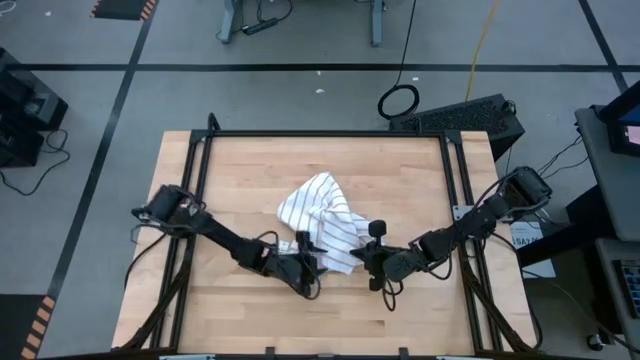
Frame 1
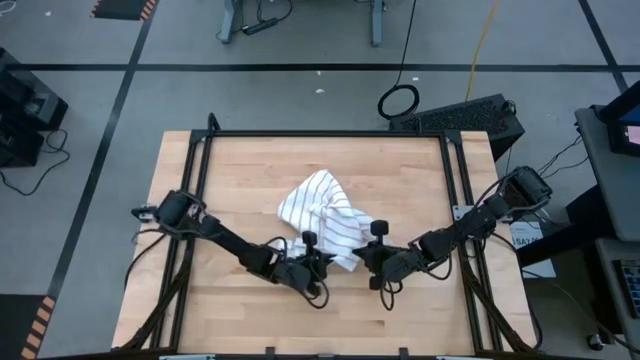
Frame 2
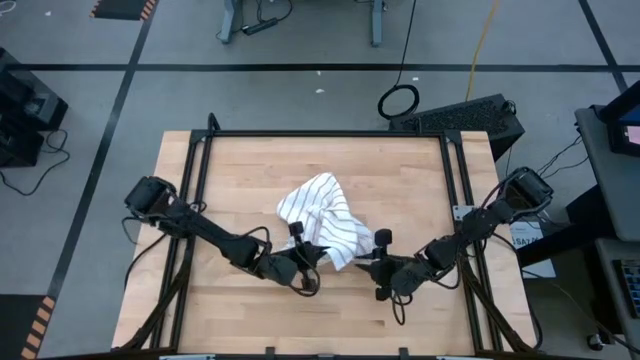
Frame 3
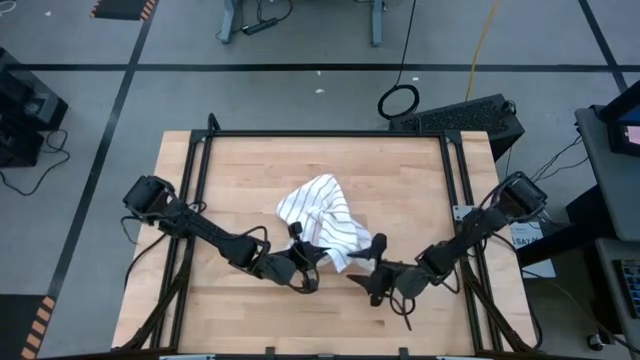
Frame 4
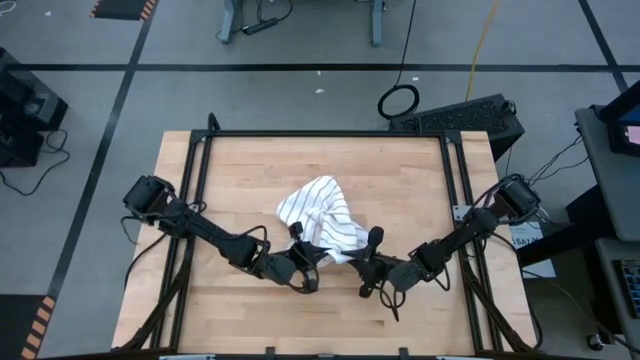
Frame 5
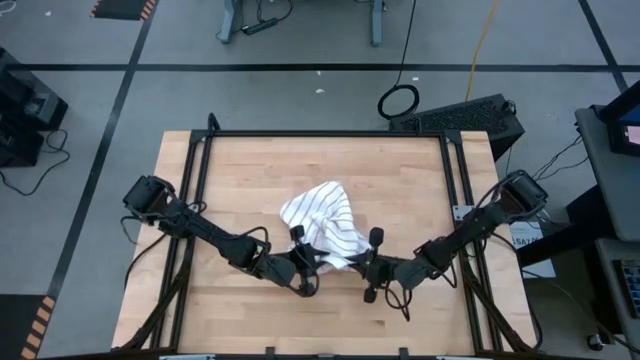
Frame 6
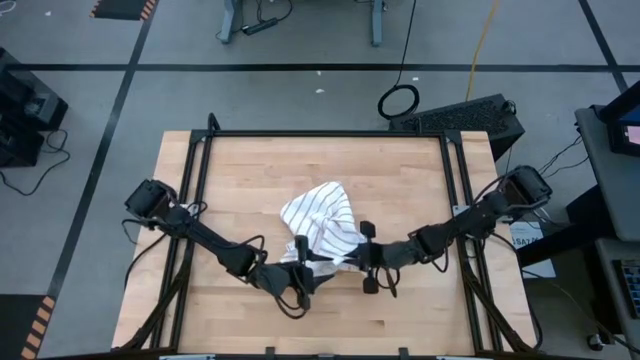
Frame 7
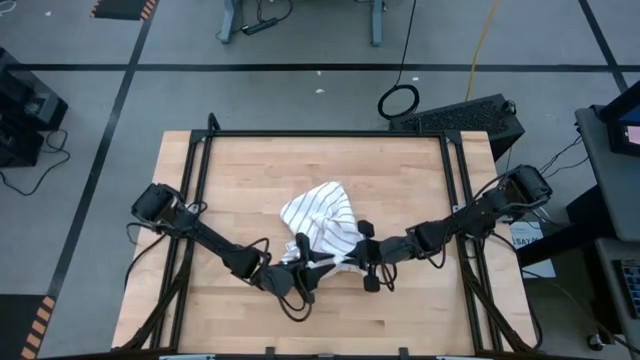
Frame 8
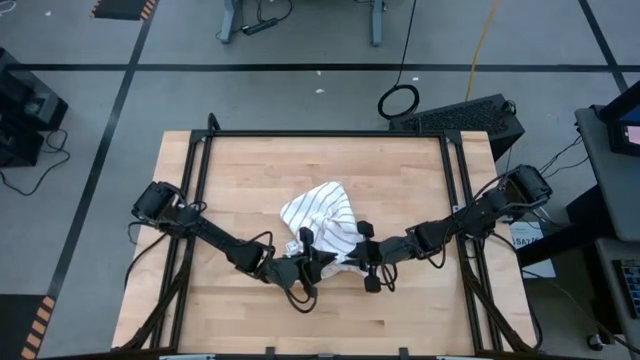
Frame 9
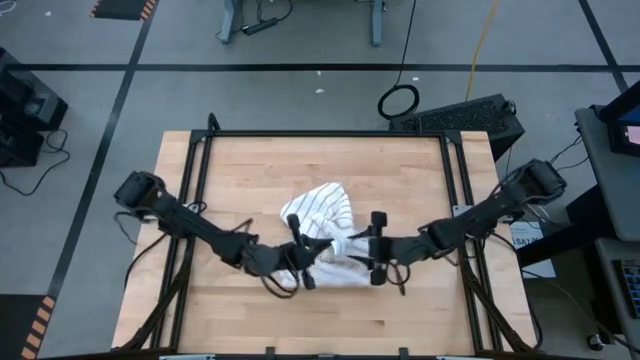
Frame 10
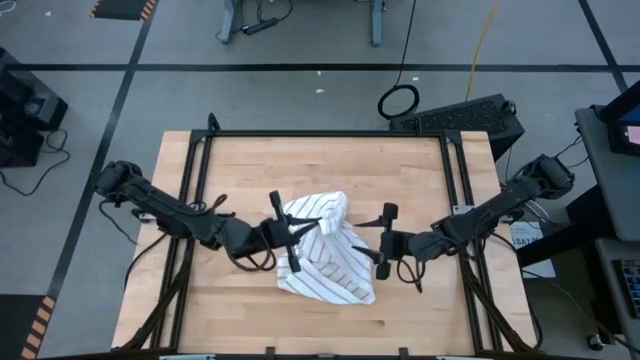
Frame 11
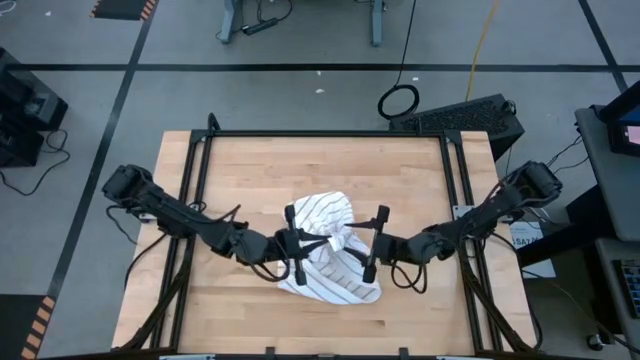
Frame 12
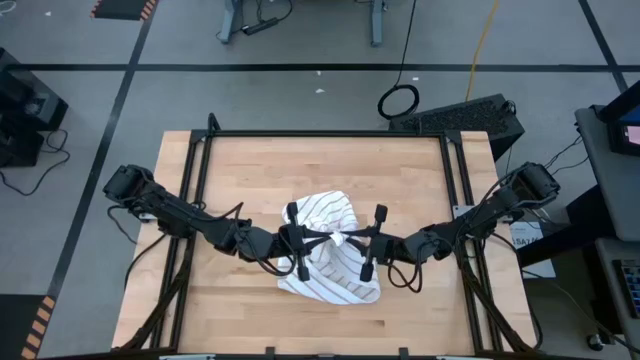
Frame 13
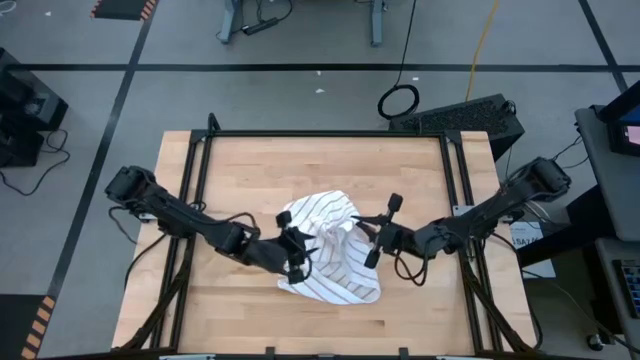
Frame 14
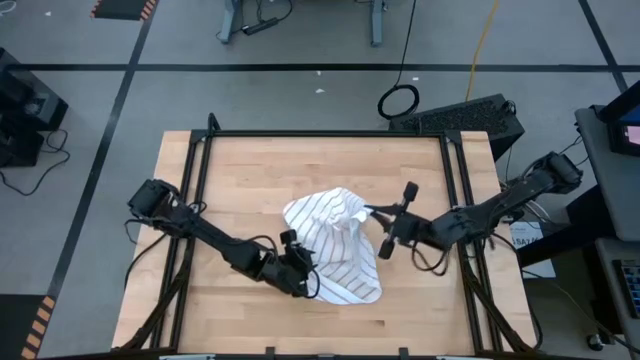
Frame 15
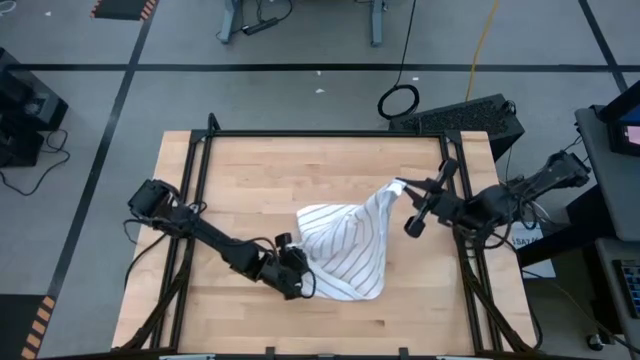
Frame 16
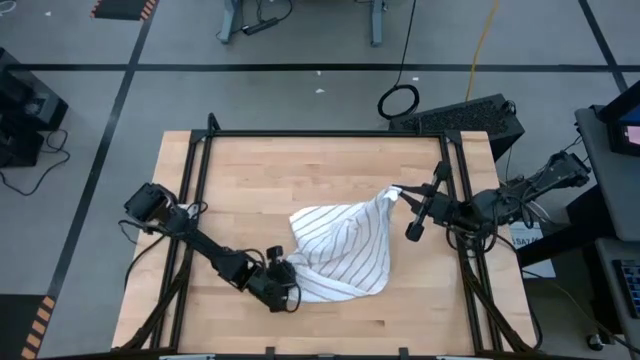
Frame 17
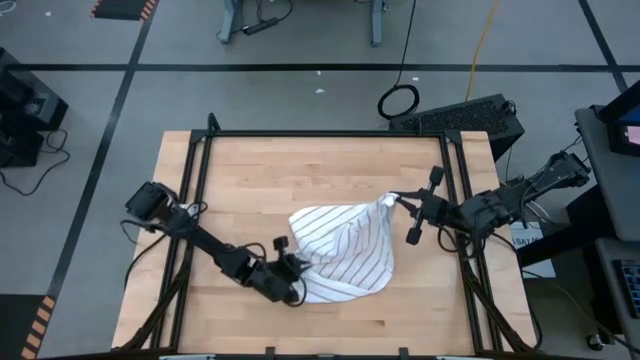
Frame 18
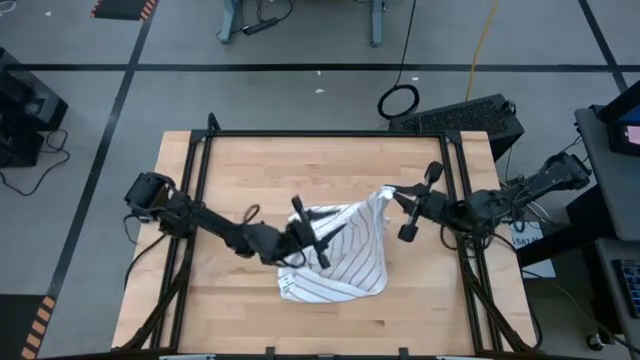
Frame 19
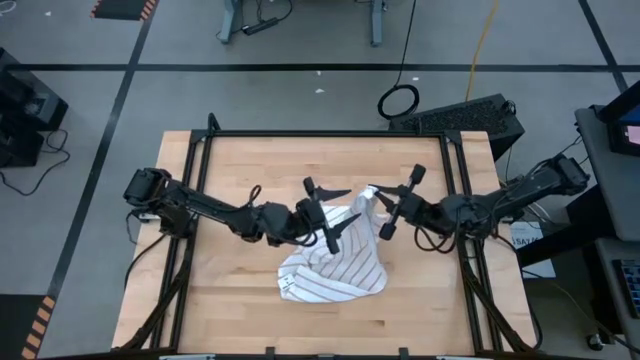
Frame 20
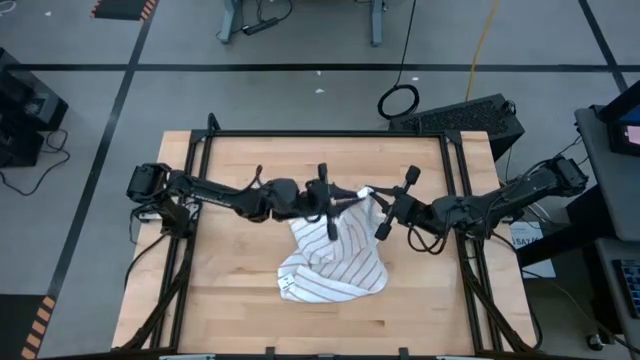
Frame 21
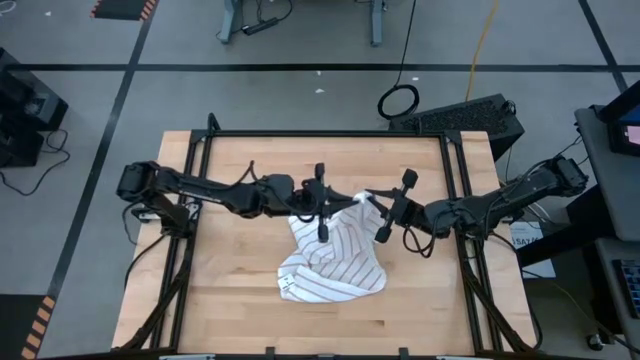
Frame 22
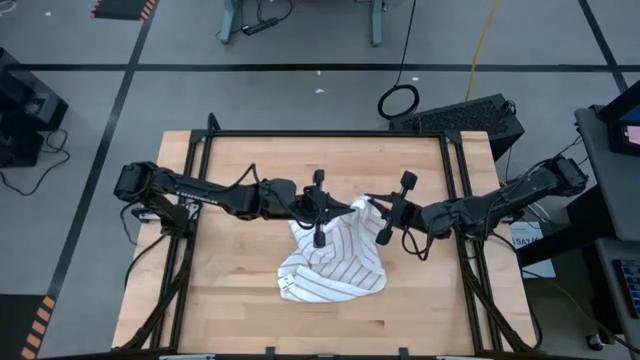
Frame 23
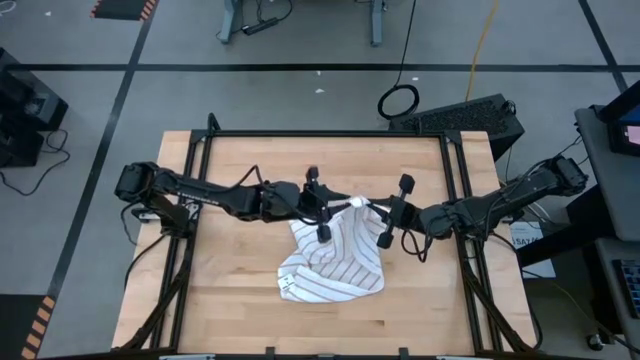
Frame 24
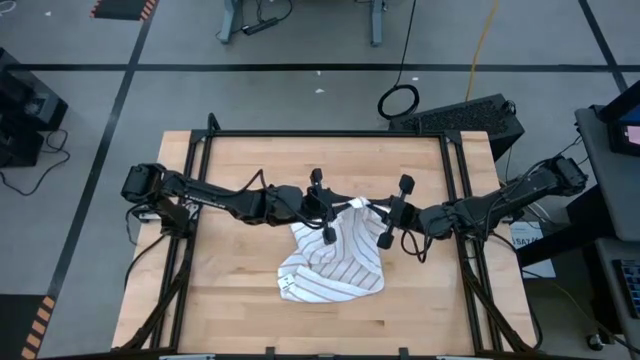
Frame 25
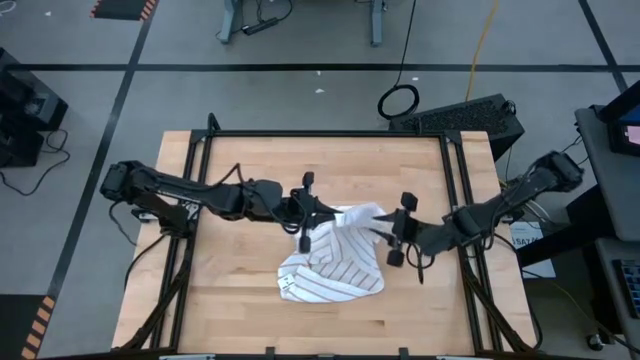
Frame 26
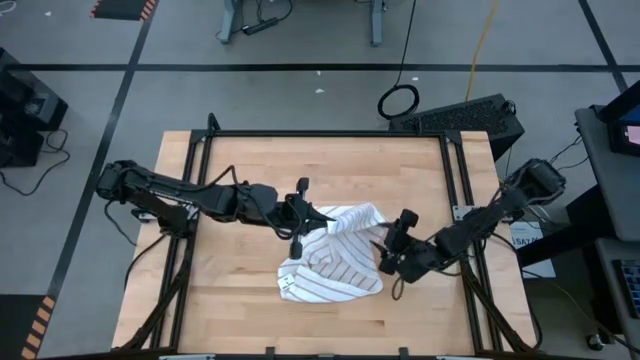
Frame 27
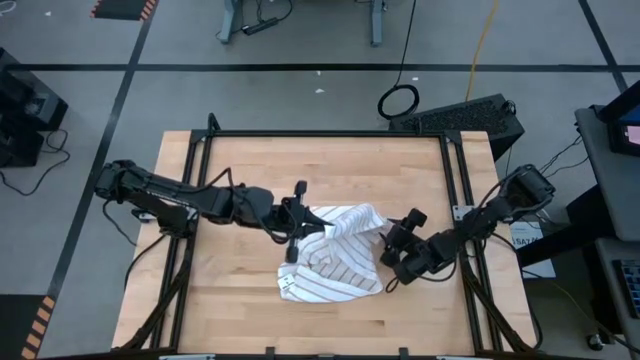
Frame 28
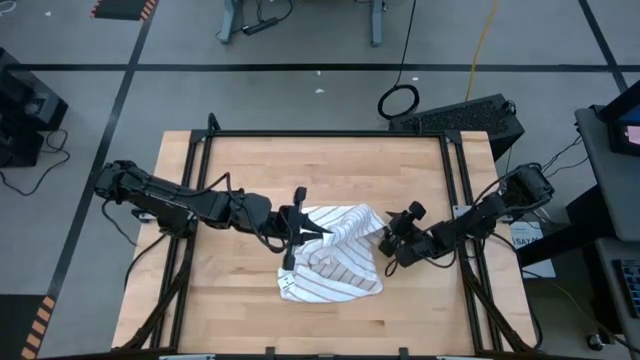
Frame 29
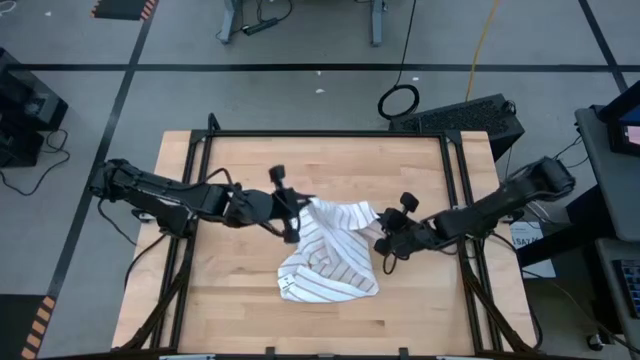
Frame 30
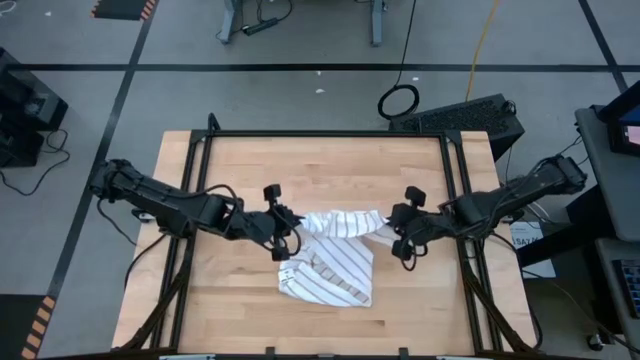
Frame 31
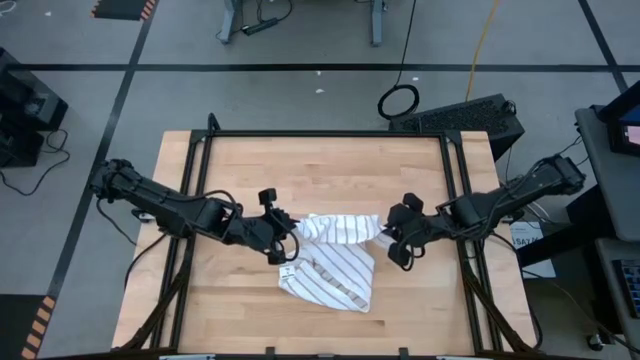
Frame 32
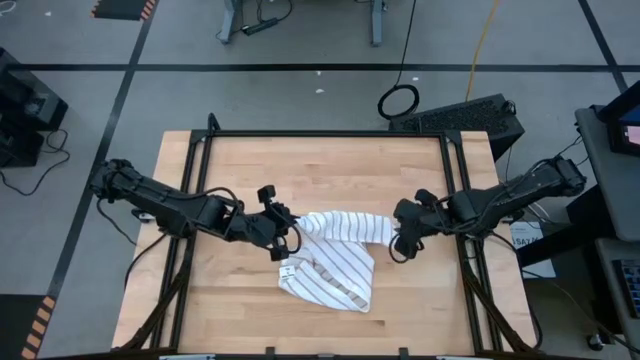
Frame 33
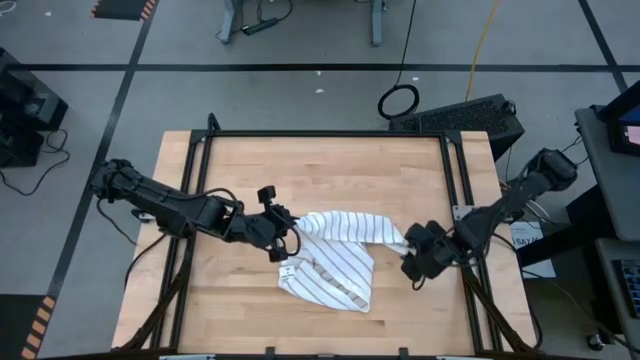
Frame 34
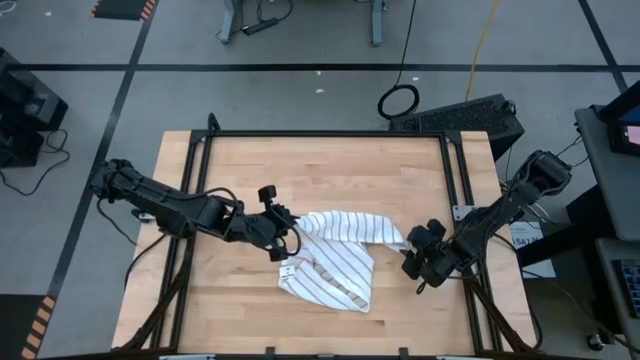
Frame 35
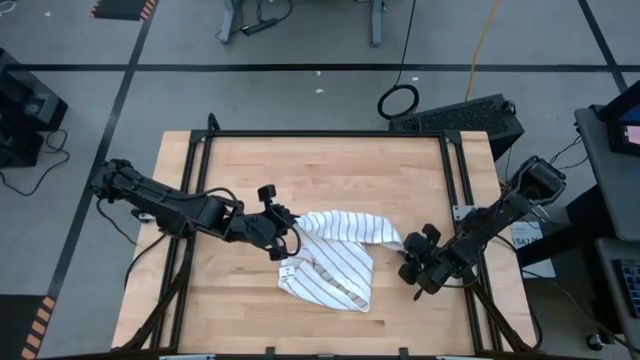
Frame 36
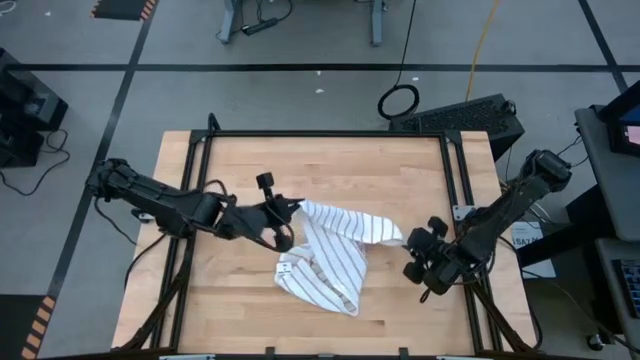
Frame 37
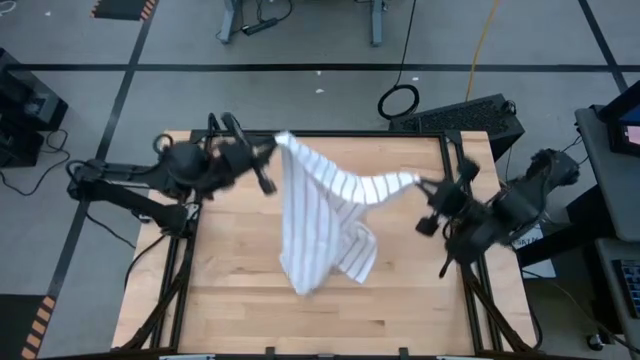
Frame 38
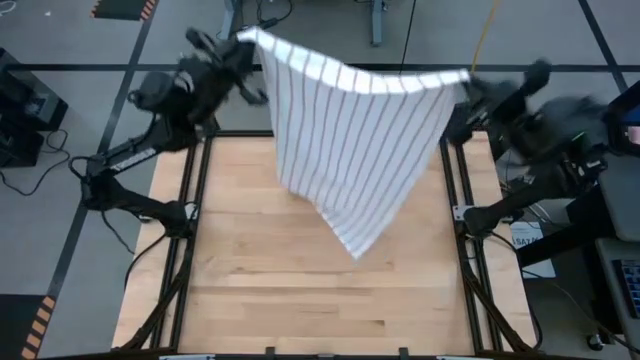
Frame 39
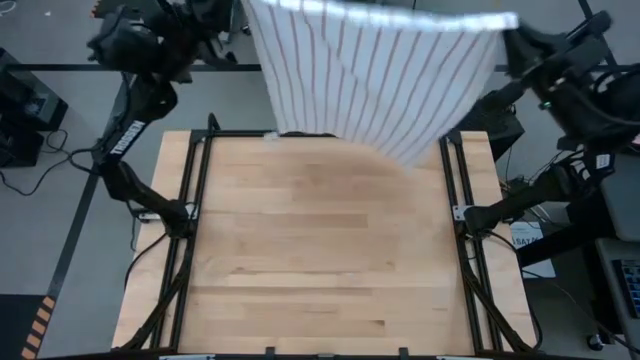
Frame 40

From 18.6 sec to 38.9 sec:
Task: Roll towel
Roll the white towel
